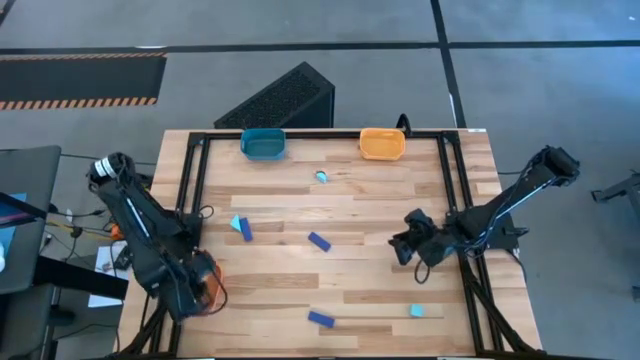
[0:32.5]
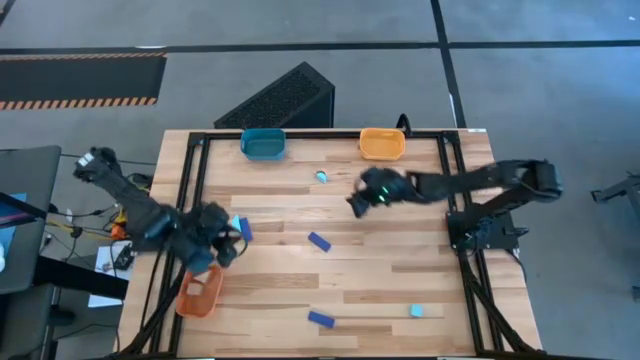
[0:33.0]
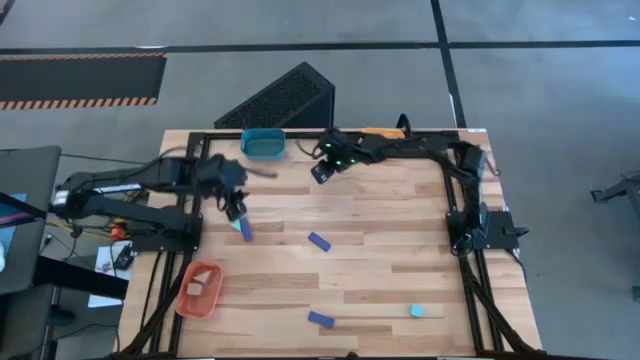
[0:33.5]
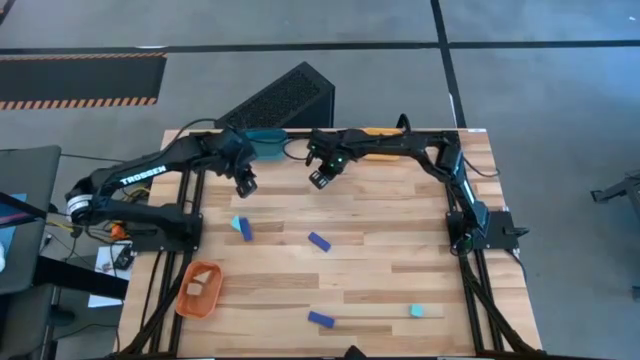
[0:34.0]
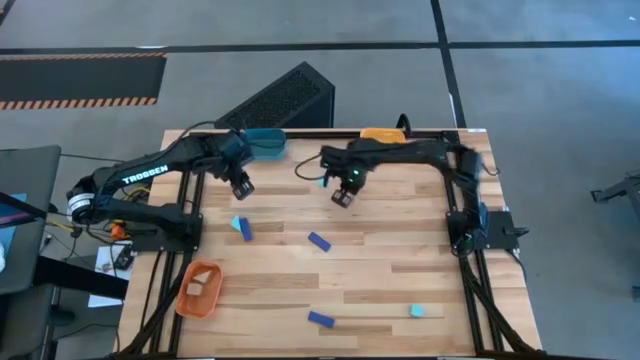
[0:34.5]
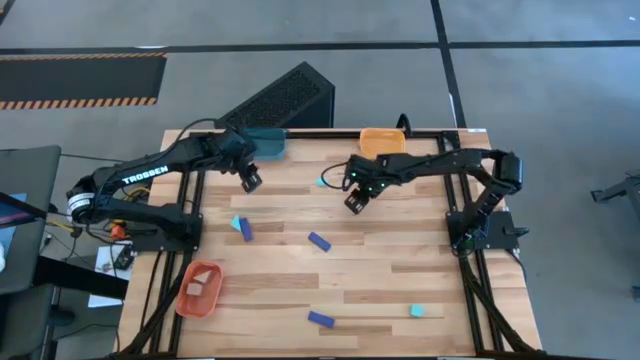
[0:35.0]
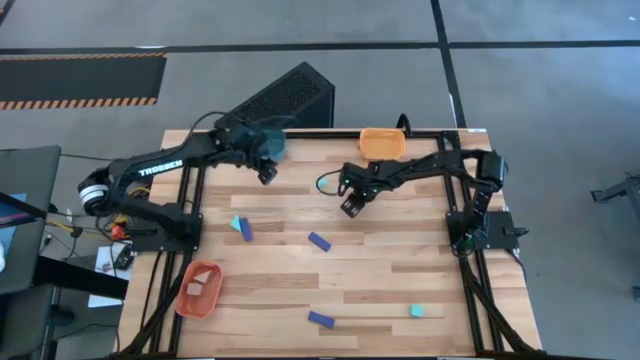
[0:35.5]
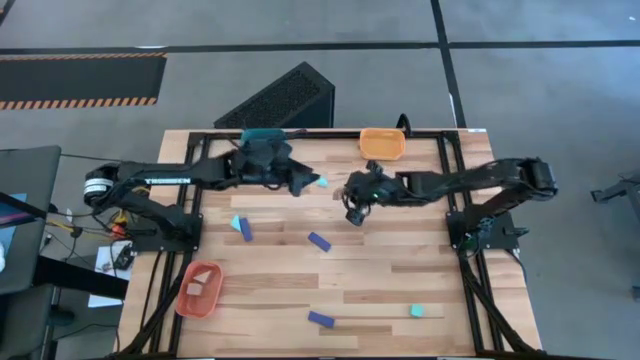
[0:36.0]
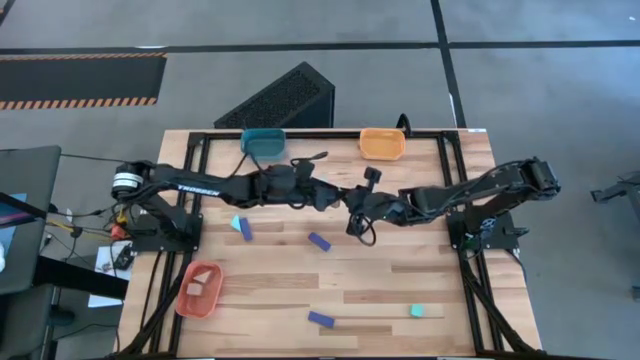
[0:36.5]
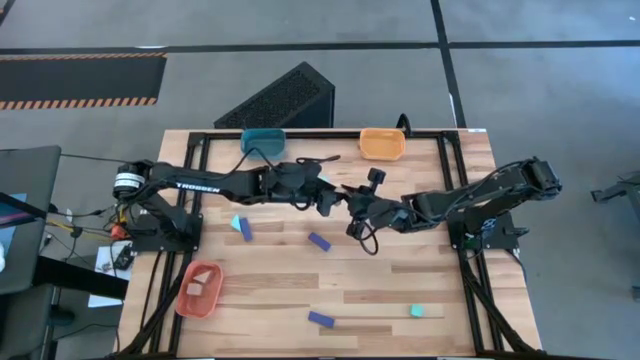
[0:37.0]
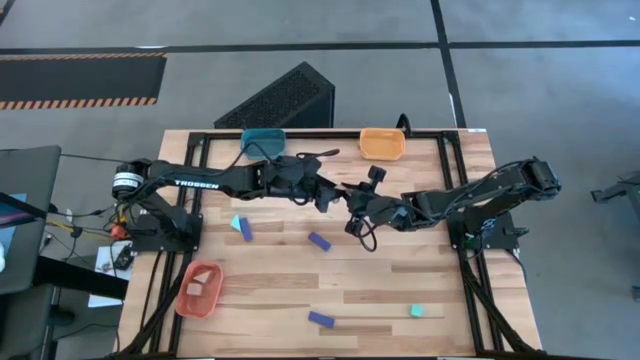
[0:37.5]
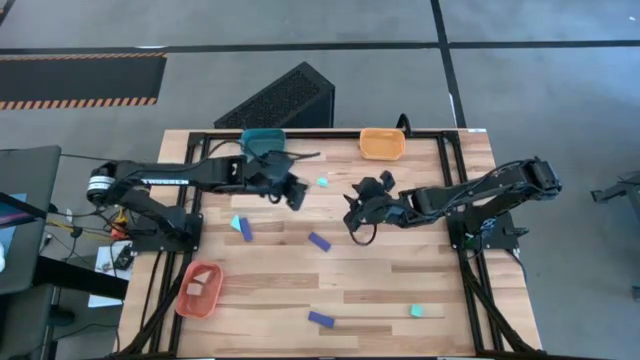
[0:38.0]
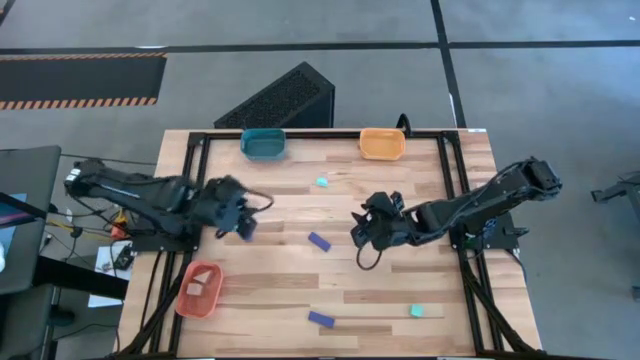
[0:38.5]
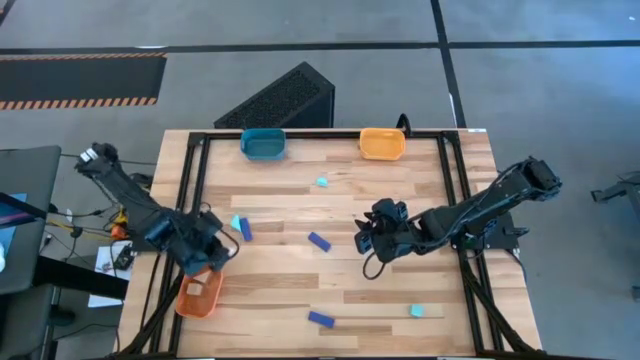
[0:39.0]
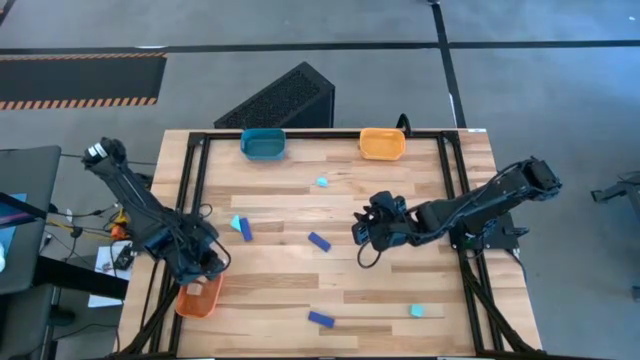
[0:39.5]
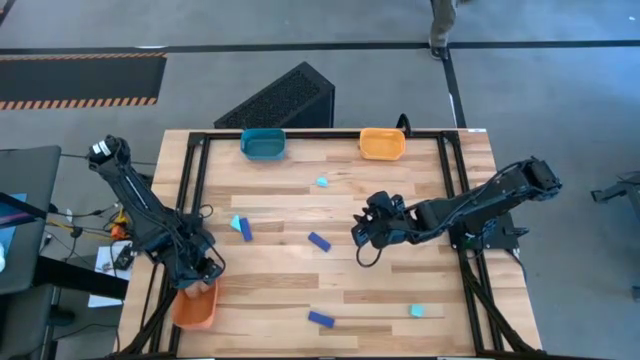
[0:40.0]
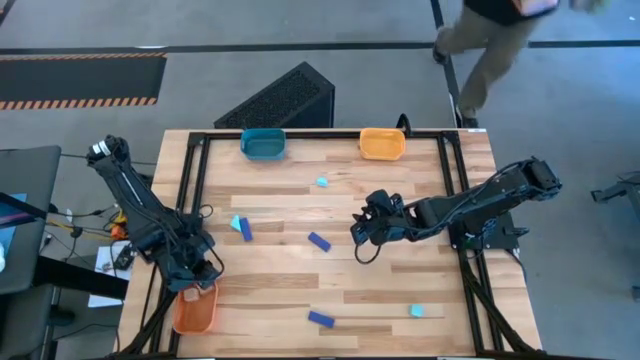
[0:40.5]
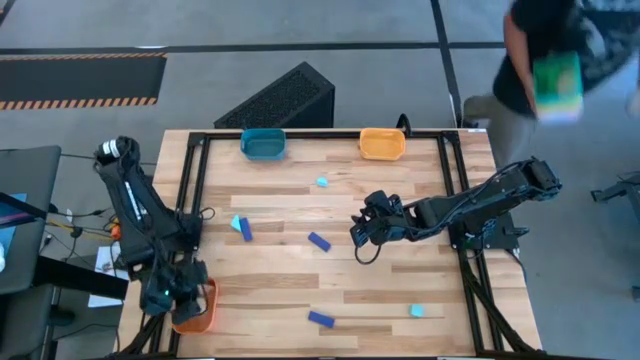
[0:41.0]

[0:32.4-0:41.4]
Task: Sort & place blocks by color
Put the brown block into the orange bin

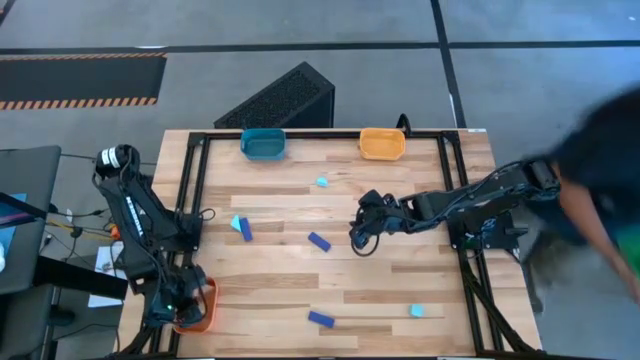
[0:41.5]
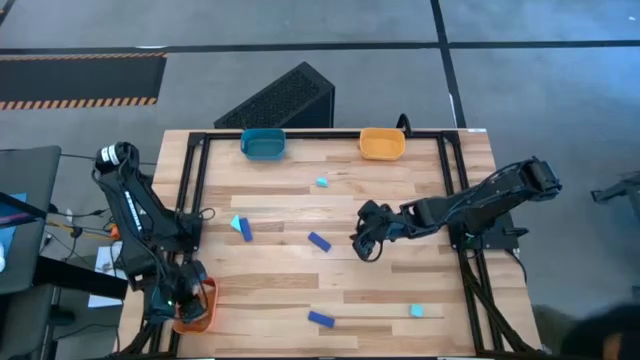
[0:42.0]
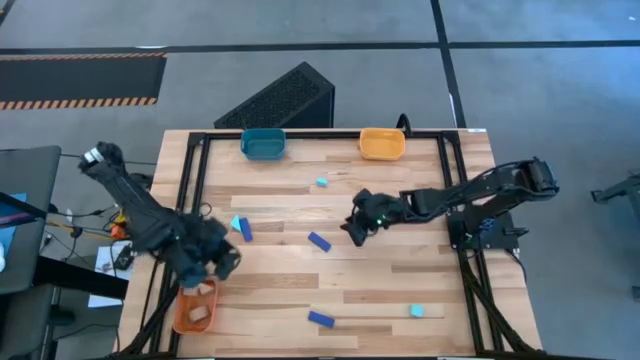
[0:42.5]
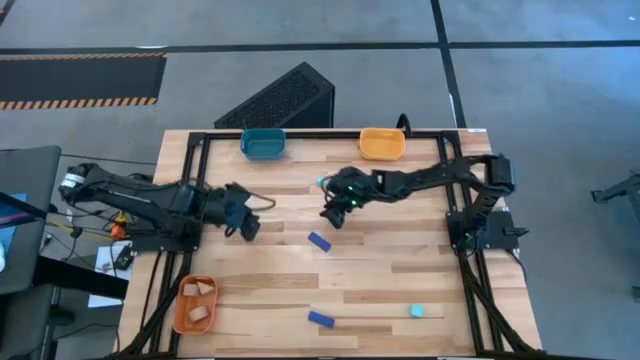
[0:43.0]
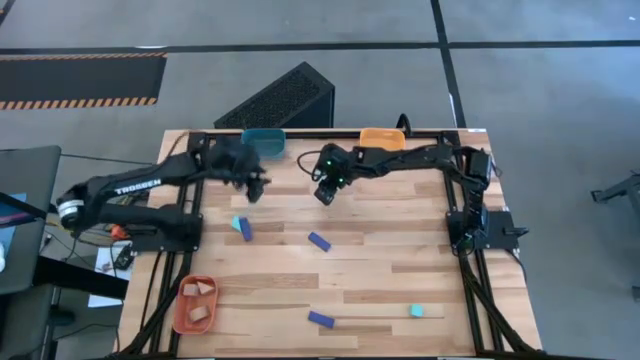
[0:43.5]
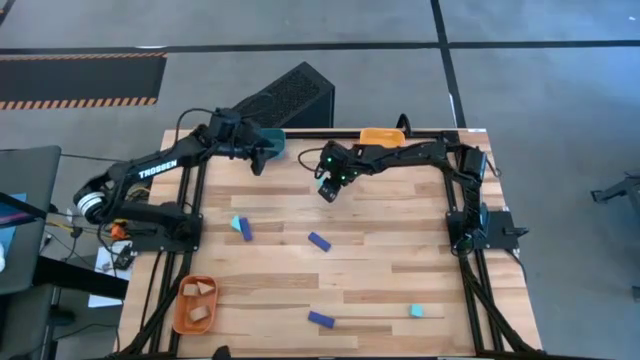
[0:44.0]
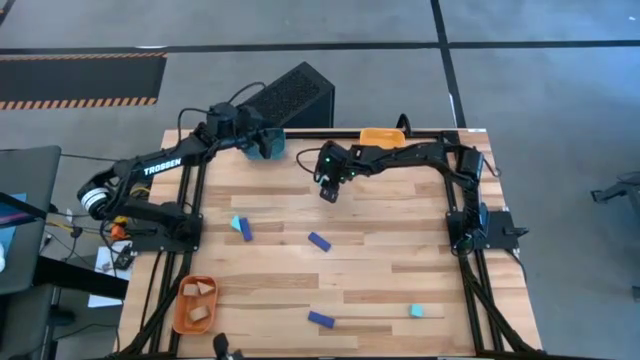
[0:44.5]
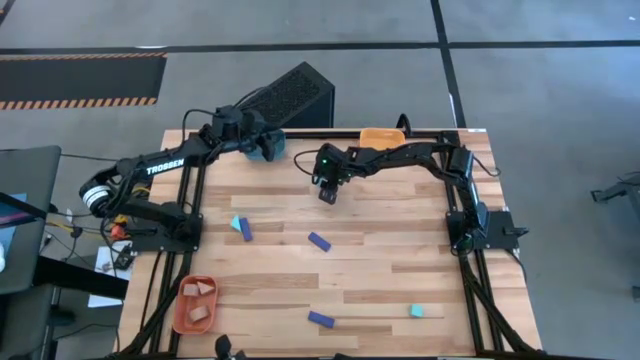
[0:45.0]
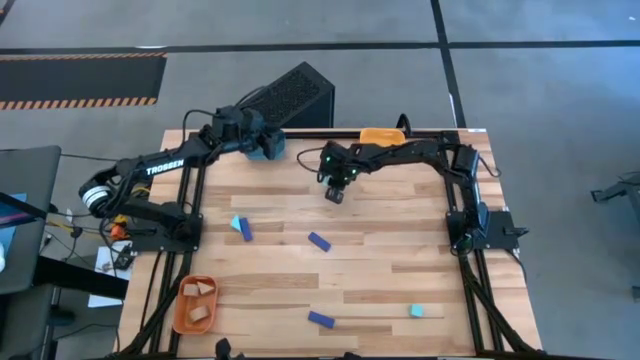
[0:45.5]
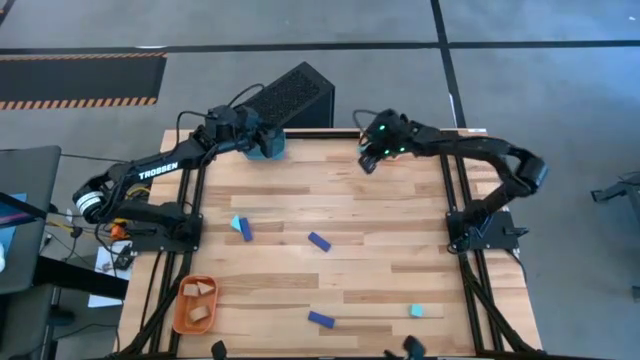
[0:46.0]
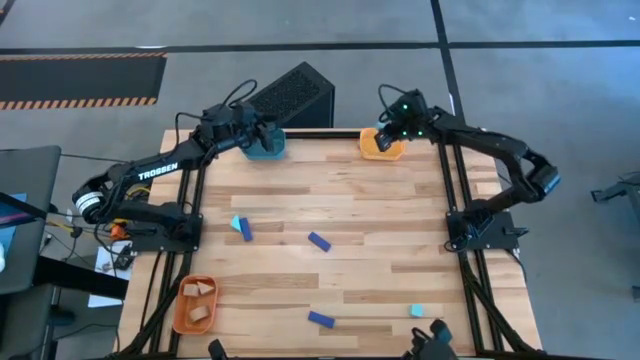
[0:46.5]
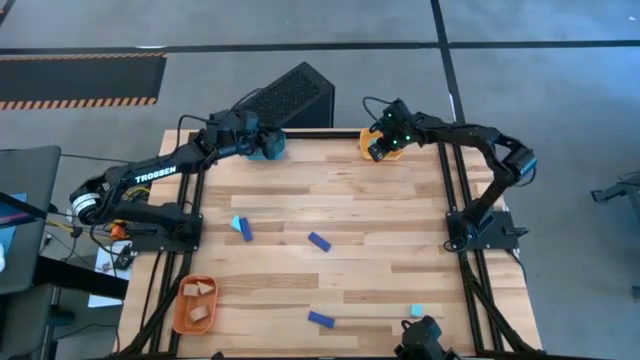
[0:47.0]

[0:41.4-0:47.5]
Put the top light blue block into the yellow bin

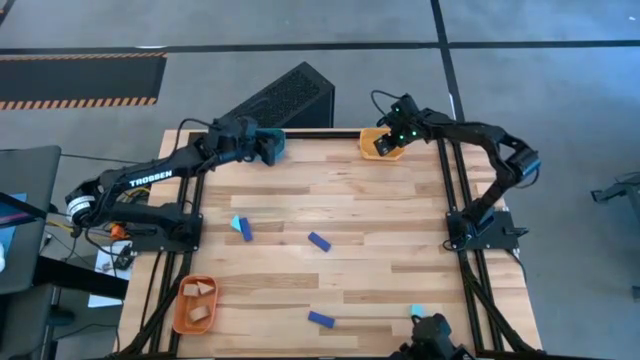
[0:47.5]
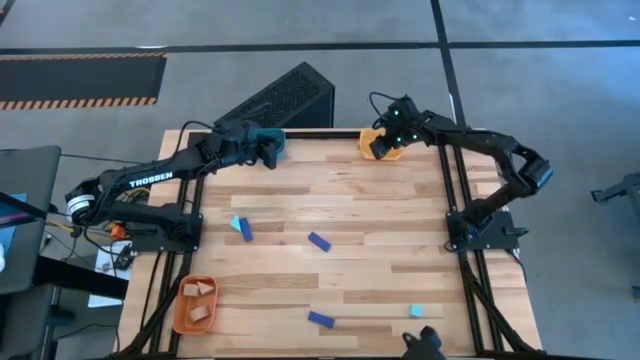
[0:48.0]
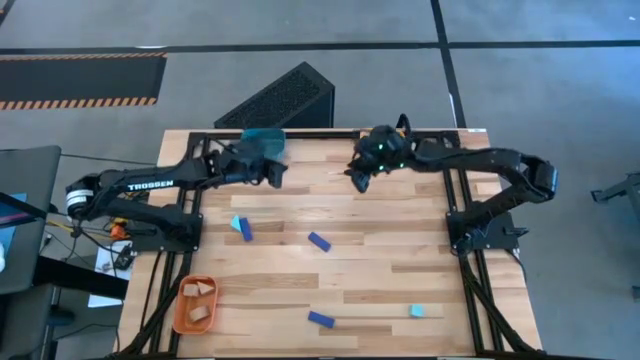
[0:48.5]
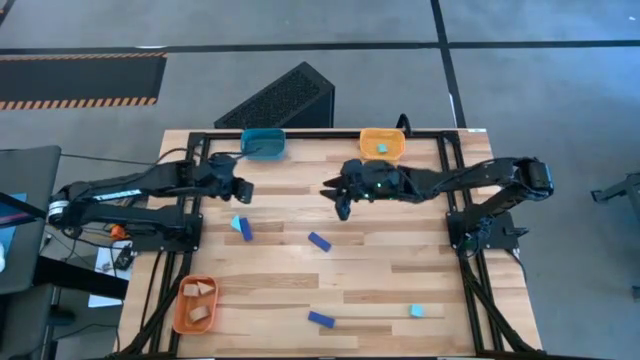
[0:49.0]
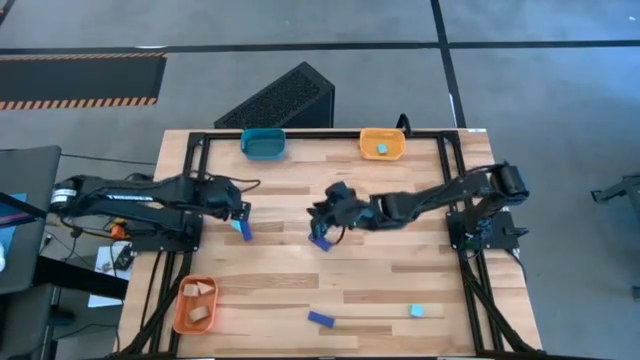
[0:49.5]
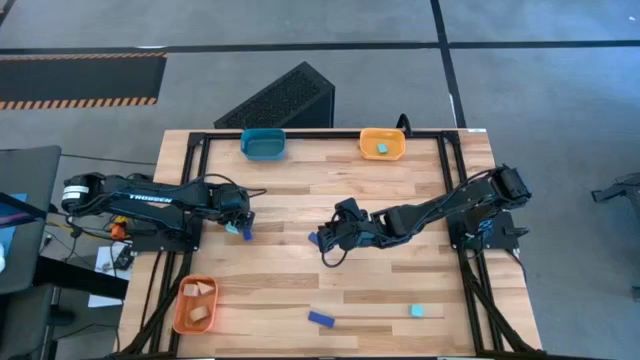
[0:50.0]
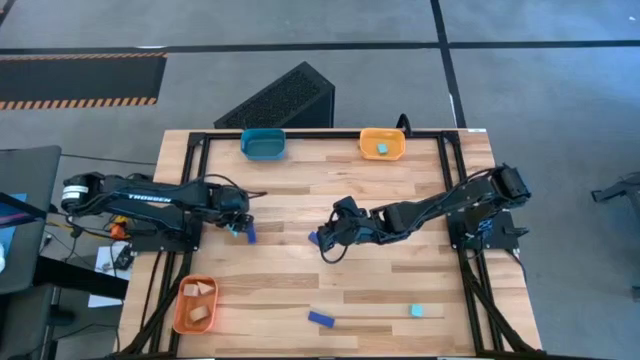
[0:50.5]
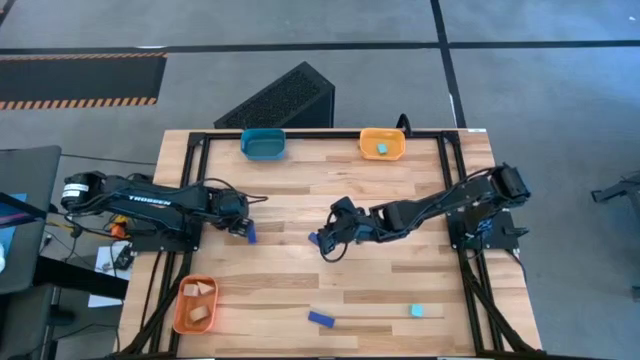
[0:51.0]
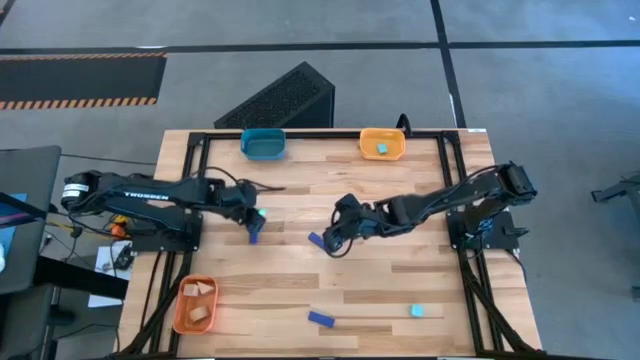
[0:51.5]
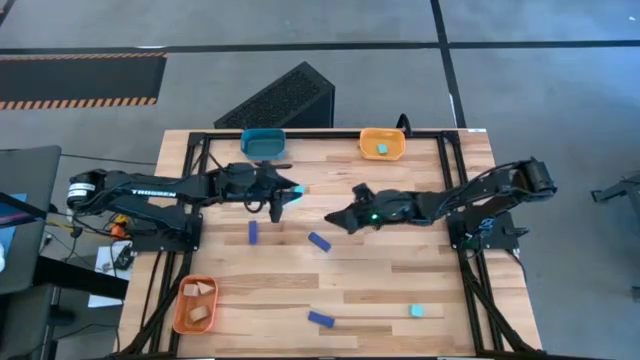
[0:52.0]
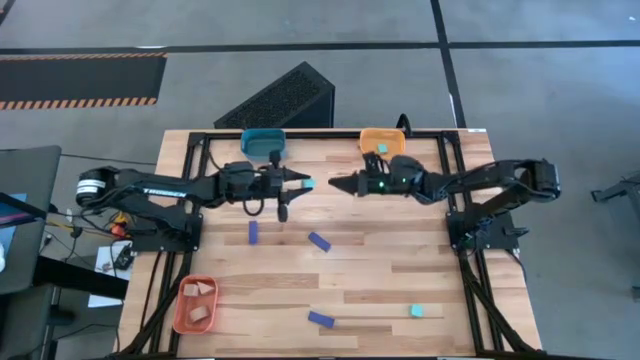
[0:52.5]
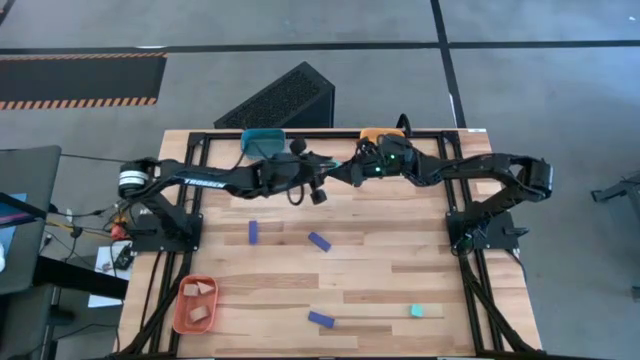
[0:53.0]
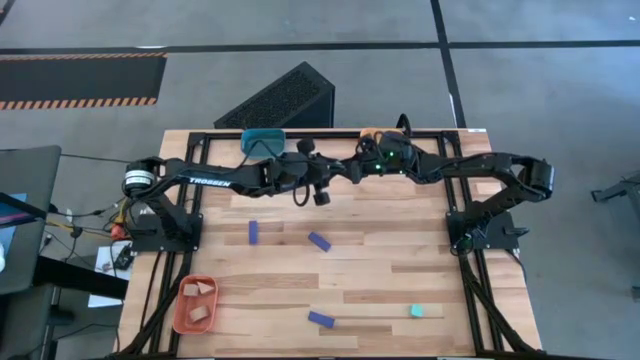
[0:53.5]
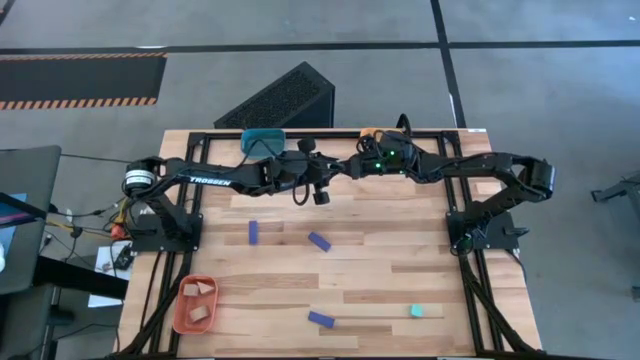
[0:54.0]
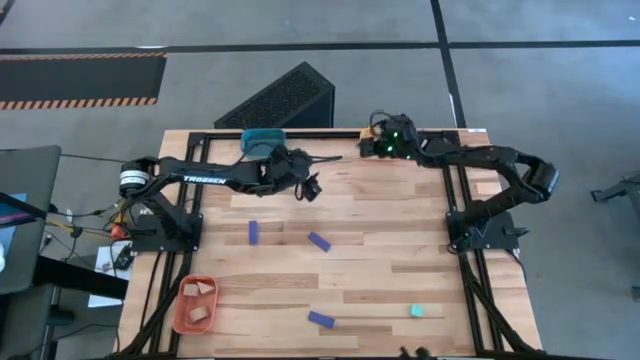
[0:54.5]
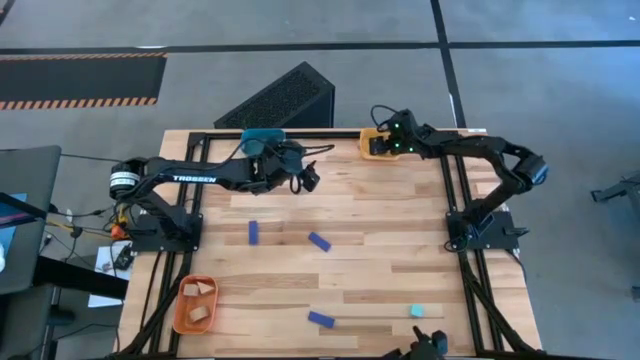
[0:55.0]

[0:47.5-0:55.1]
Put the top light blue block into the yellow bin
